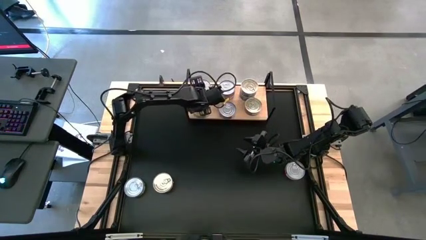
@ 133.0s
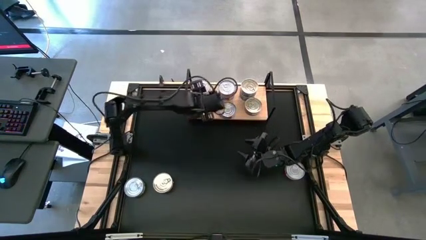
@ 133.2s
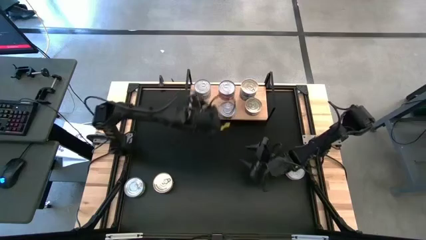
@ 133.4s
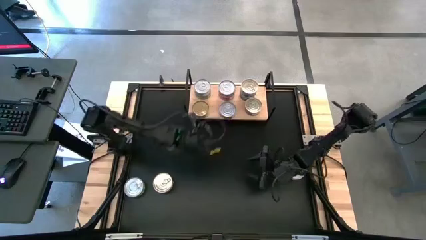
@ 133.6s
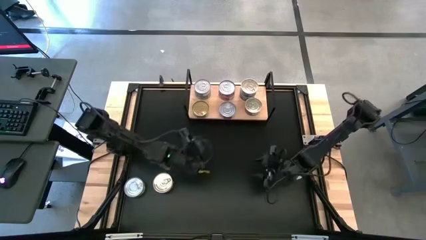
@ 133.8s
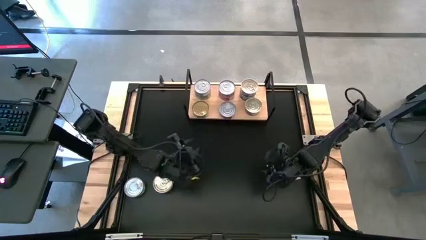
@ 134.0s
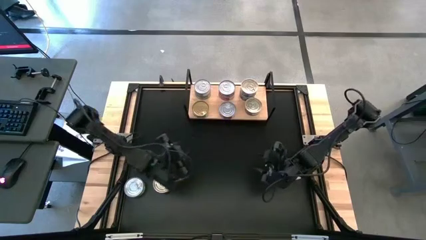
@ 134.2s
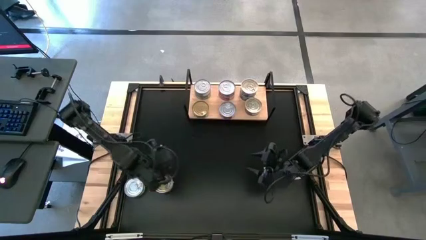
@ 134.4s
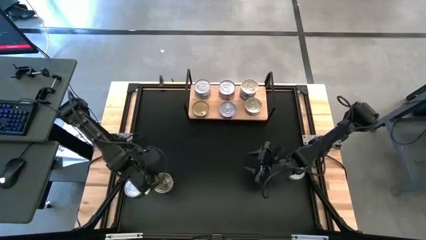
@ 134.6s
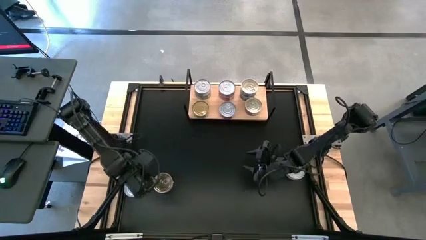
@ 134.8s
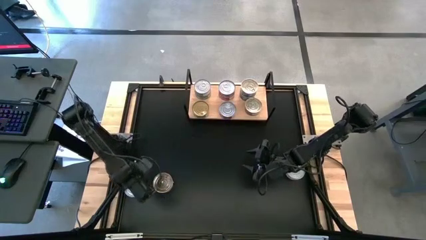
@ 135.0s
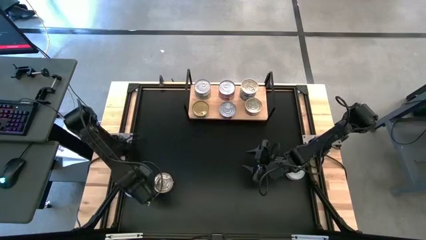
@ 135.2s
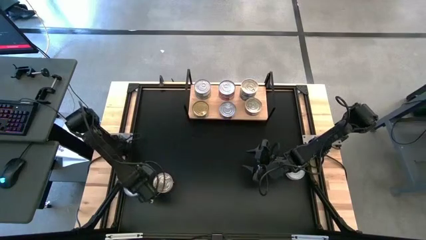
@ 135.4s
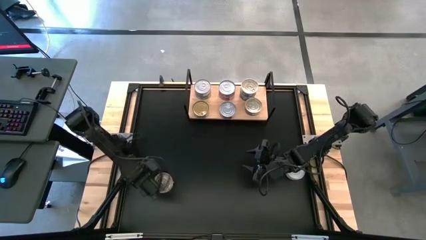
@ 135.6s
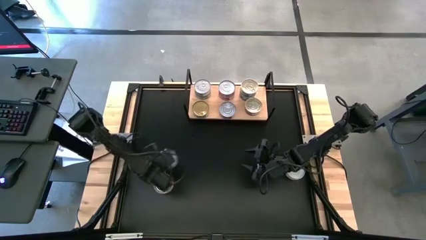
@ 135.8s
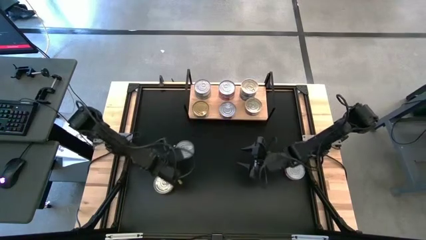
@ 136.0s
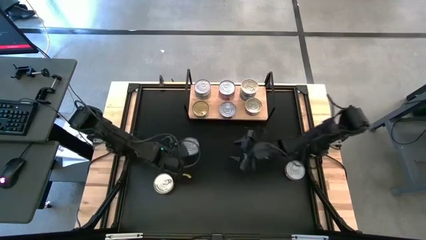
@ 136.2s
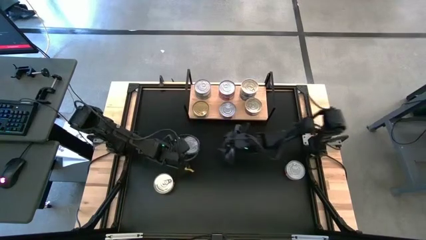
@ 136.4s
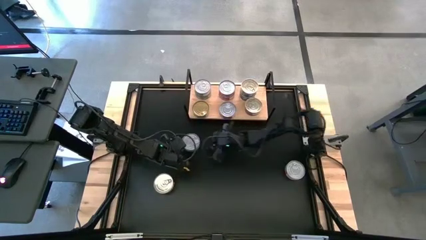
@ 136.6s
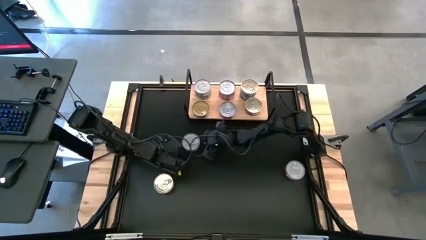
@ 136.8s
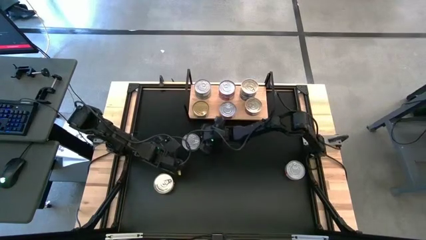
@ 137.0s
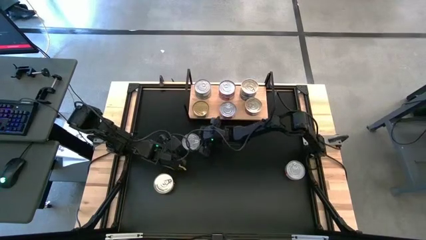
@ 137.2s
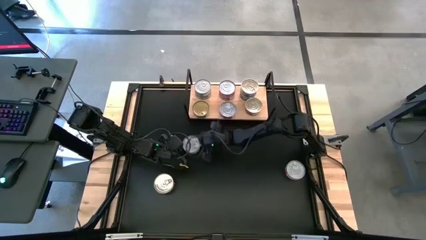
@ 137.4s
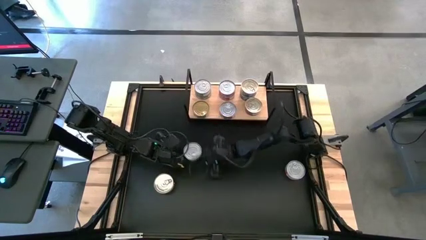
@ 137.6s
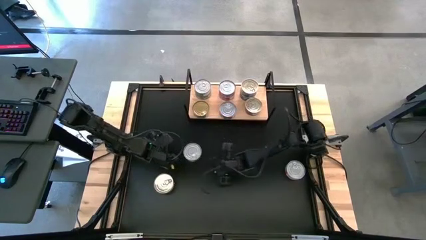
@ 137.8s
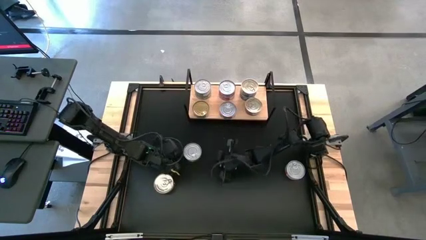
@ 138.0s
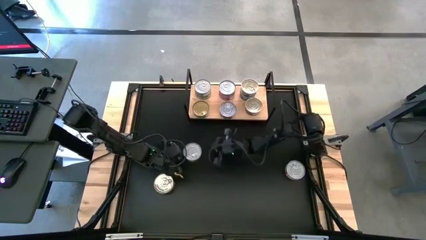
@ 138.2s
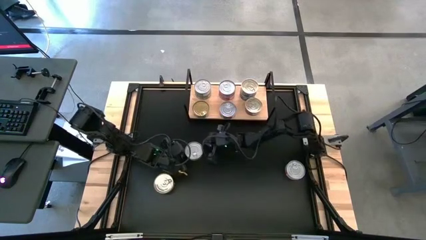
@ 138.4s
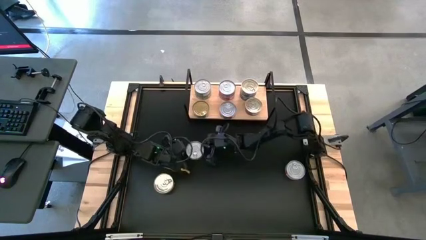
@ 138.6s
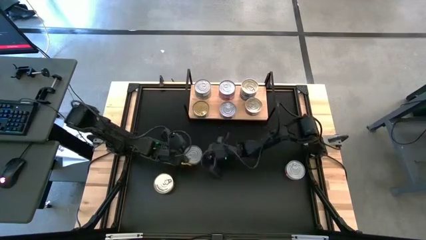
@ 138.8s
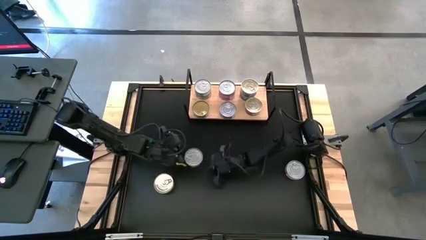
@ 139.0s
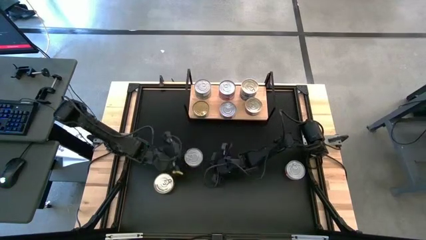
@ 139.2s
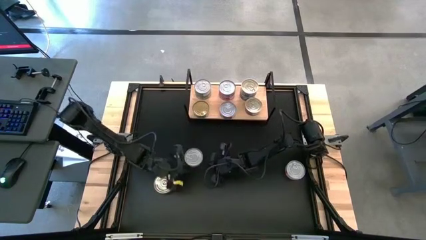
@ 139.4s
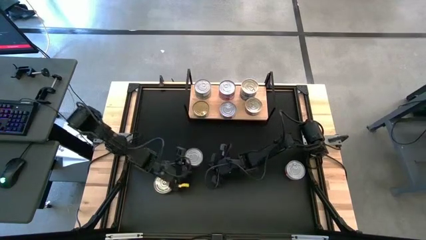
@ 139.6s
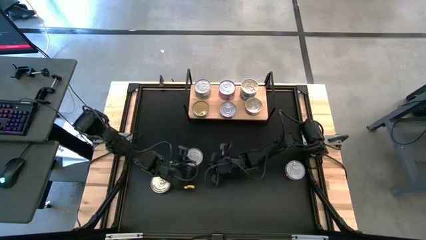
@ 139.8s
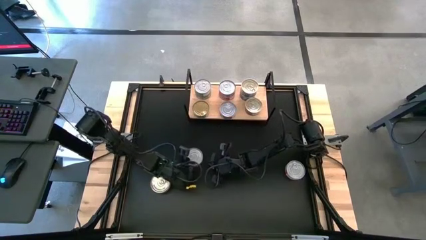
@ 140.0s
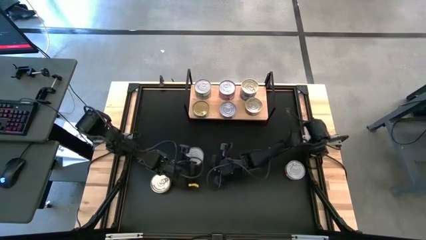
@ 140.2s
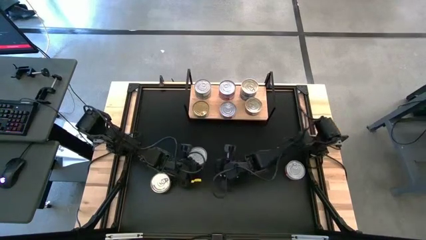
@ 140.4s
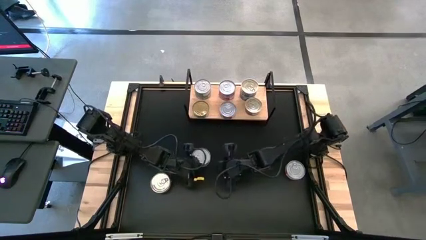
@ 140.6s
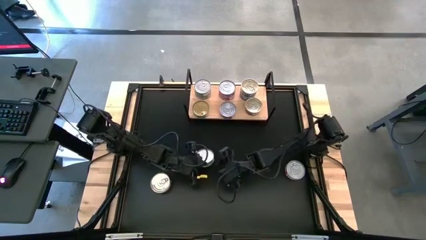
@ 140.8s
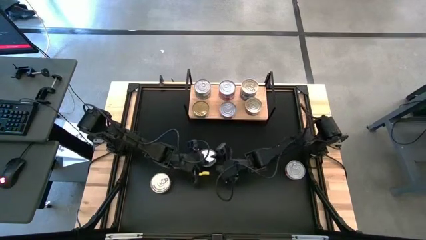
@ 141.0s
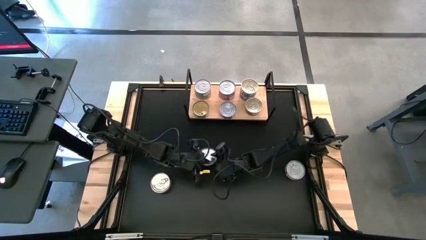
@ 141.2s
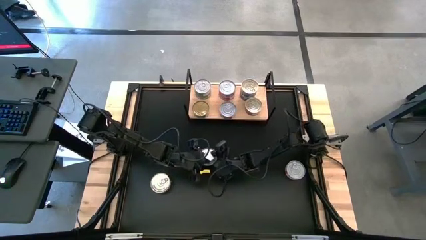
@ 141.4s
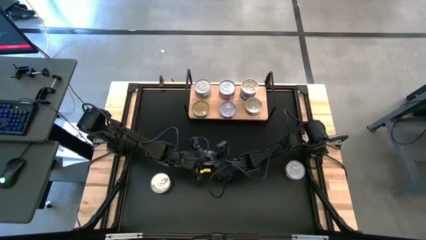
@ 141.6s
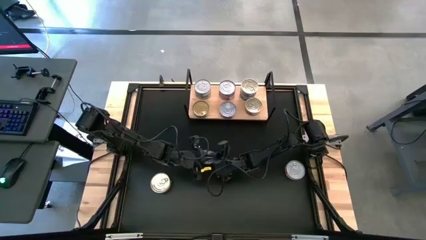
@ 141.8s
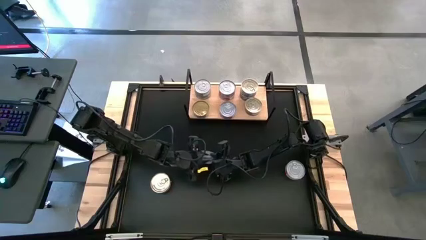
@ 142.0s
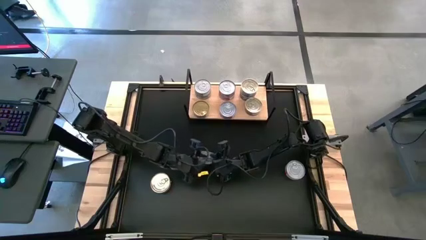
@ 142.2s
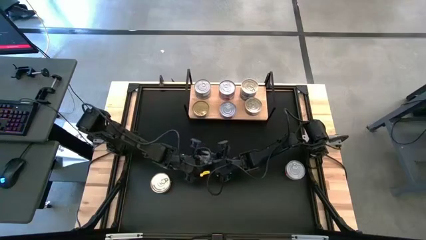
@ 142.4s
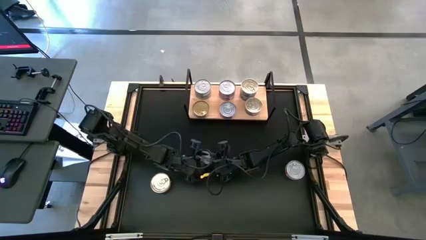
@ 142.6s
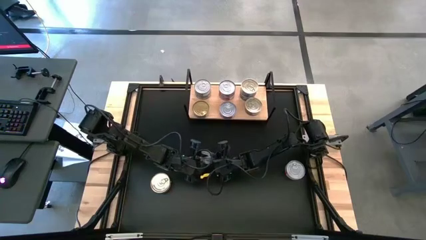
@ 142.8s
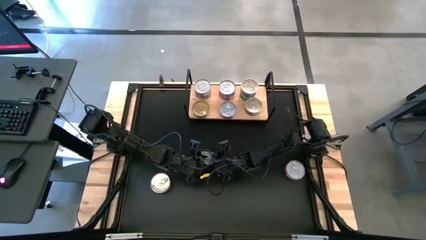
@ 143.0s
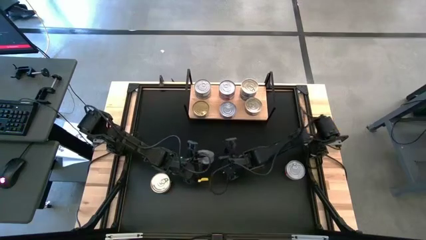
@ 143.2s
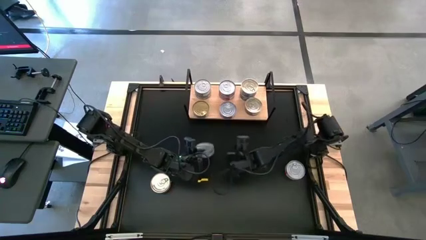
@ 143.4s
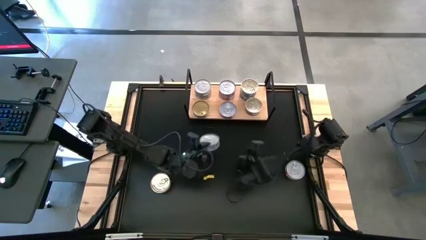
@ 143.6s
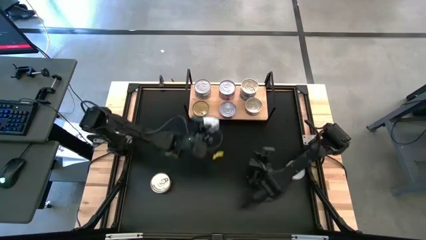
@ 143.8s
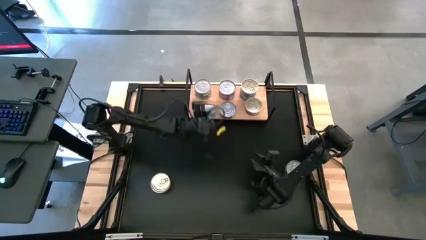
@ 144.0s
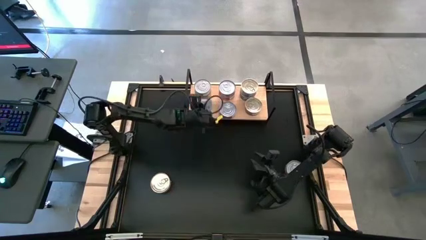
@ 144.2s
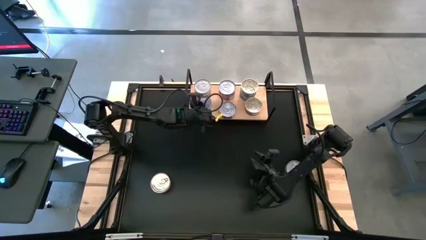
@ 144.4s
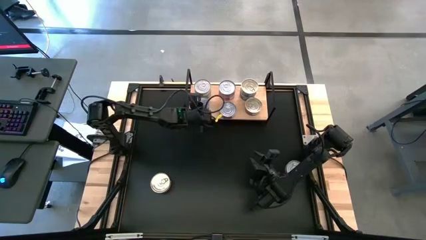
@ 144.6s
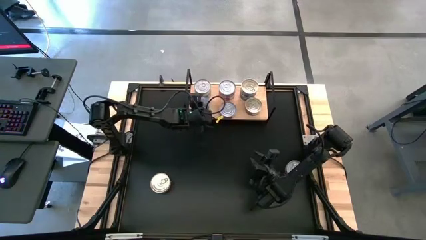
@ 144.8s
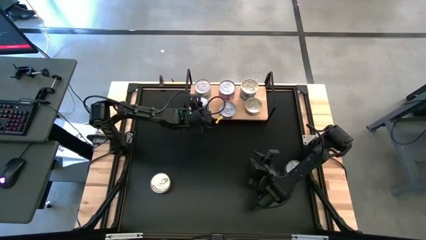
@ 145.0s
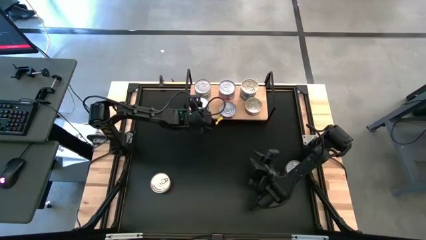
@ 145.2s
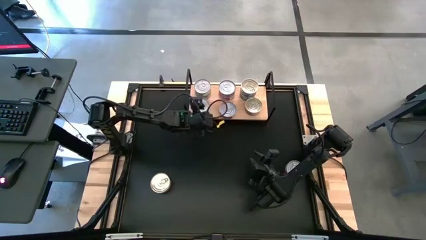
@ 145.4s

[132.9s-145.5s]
Task: Stack canned seafood by type on shelf
Stack the green tuna can on top of the green tuna can on the shelf
